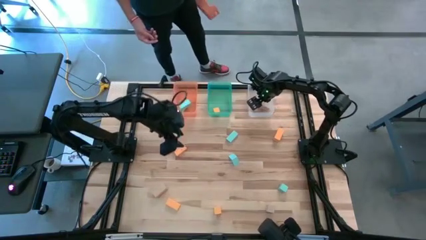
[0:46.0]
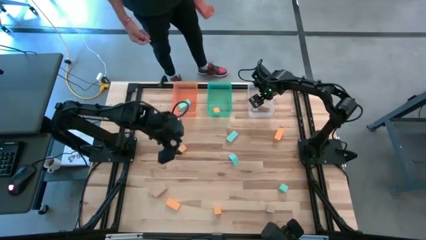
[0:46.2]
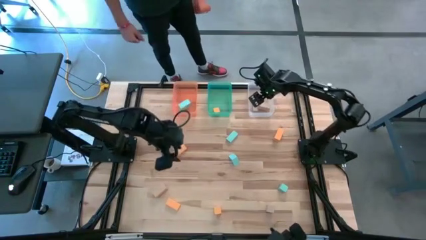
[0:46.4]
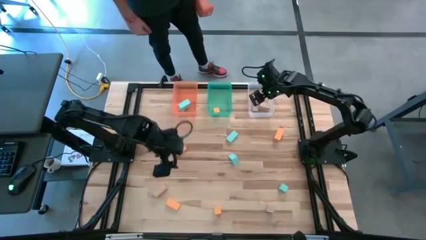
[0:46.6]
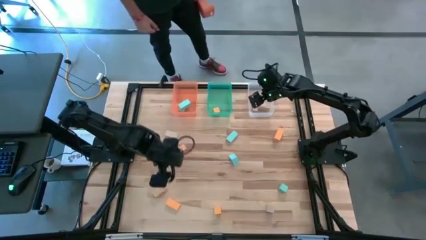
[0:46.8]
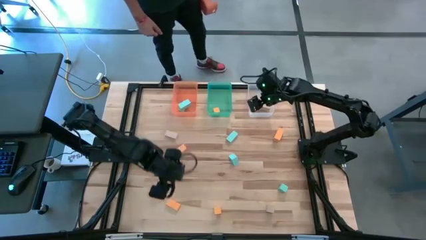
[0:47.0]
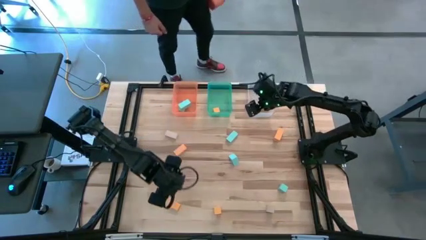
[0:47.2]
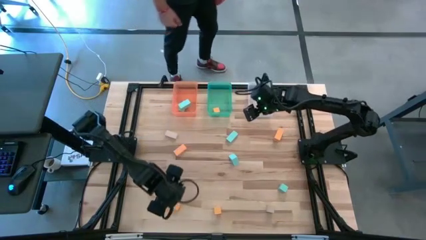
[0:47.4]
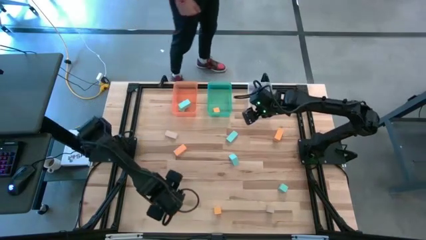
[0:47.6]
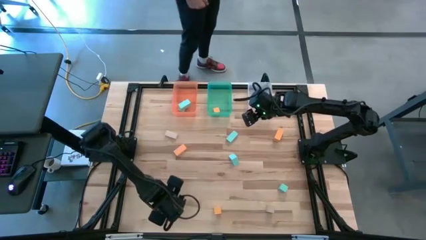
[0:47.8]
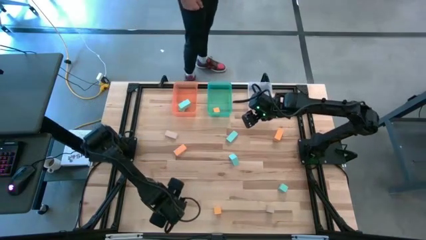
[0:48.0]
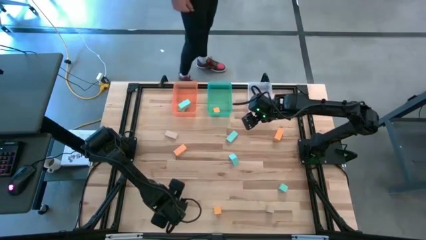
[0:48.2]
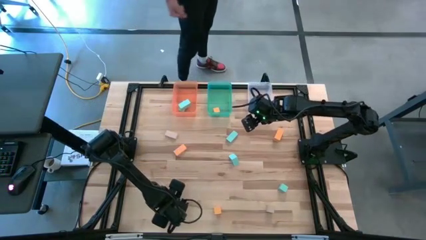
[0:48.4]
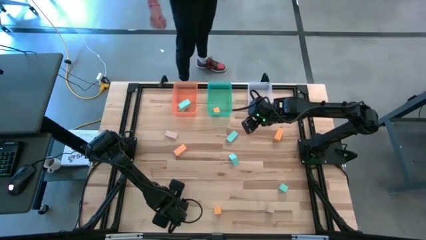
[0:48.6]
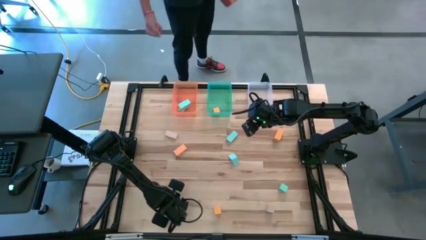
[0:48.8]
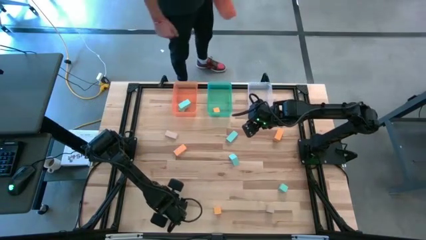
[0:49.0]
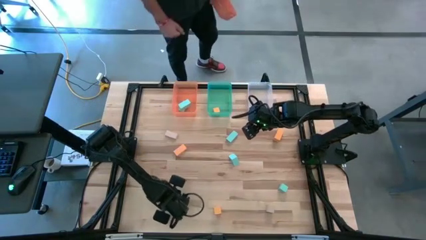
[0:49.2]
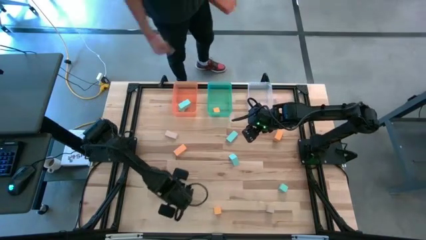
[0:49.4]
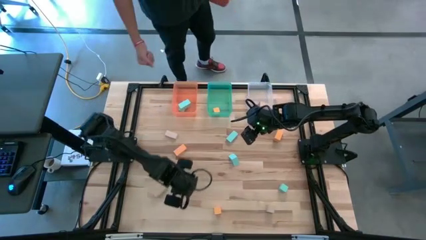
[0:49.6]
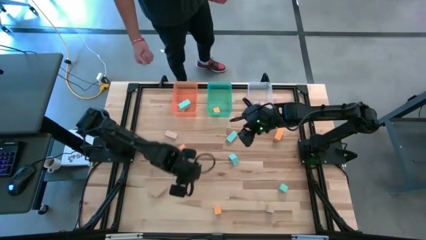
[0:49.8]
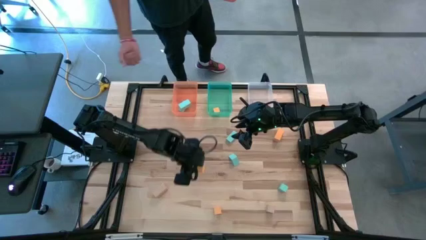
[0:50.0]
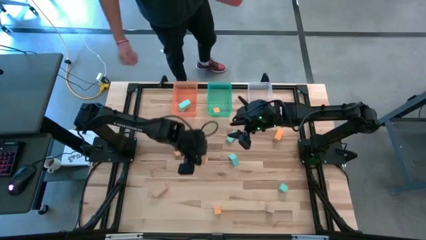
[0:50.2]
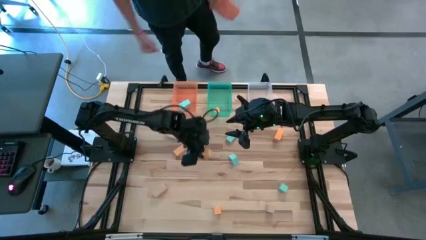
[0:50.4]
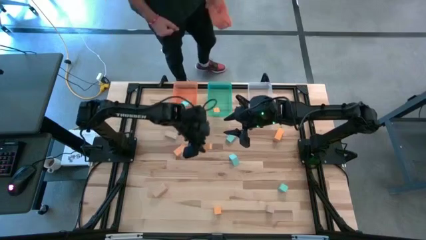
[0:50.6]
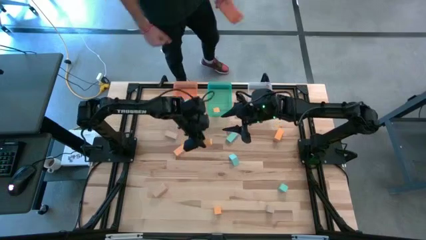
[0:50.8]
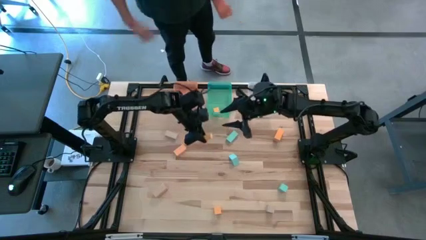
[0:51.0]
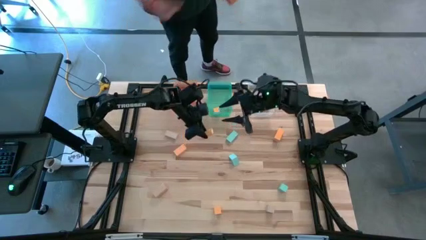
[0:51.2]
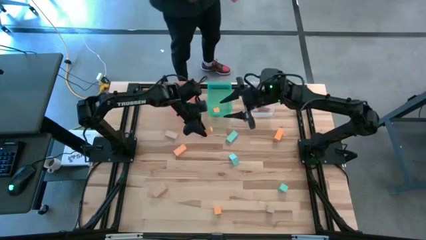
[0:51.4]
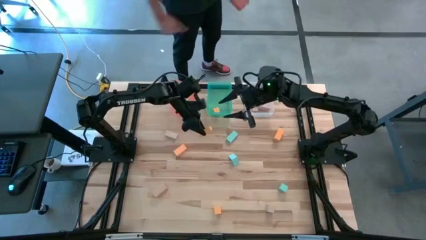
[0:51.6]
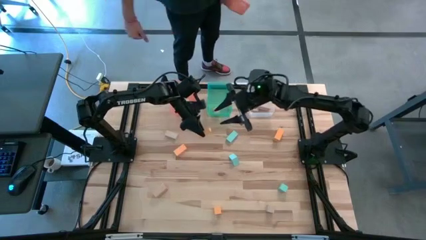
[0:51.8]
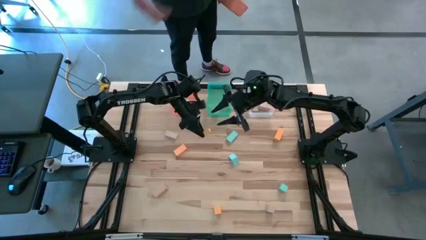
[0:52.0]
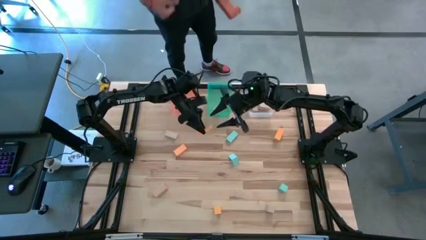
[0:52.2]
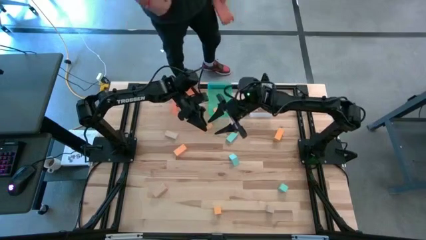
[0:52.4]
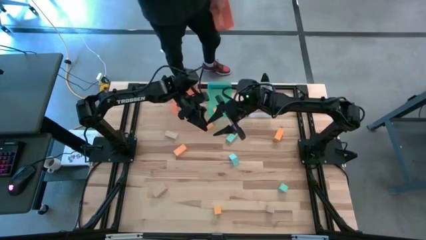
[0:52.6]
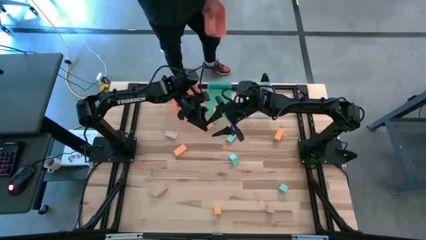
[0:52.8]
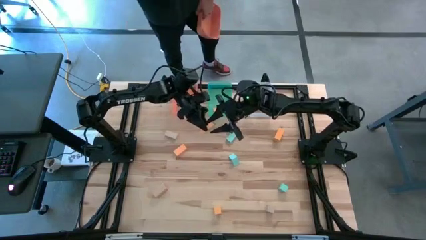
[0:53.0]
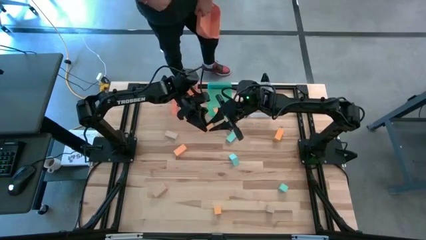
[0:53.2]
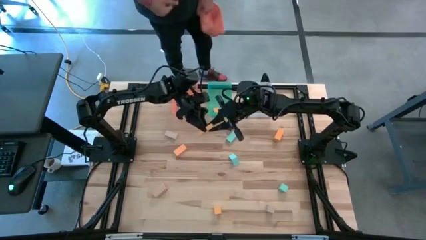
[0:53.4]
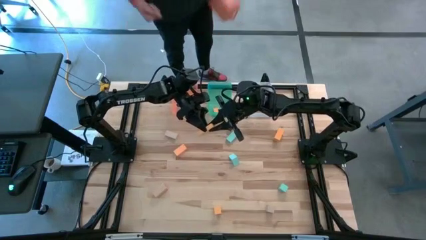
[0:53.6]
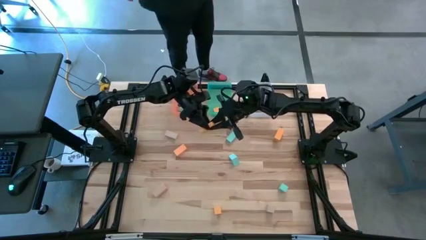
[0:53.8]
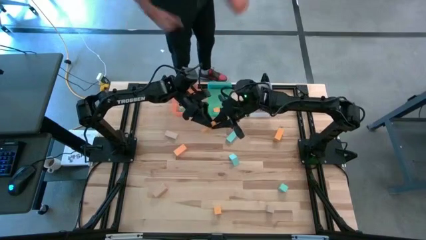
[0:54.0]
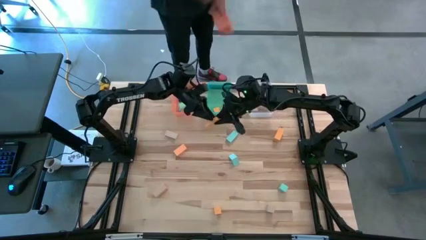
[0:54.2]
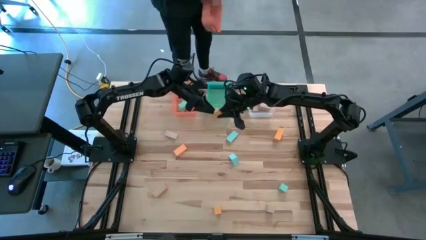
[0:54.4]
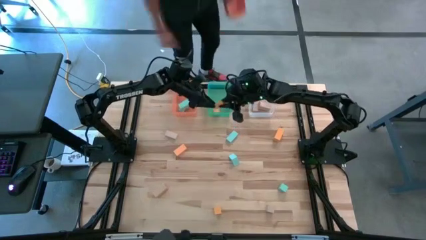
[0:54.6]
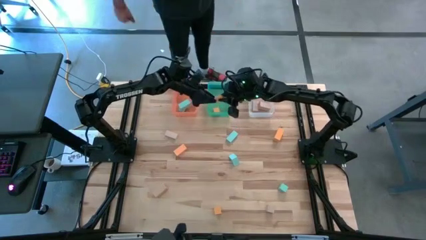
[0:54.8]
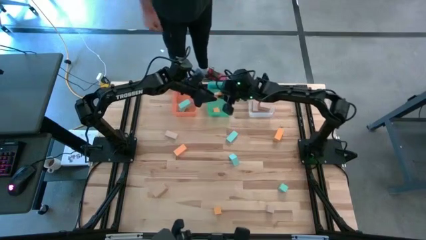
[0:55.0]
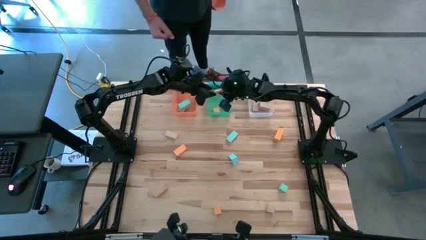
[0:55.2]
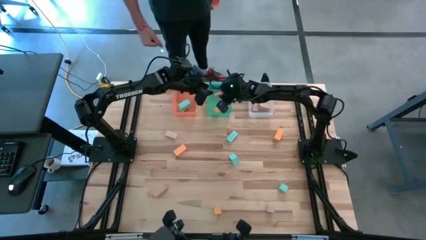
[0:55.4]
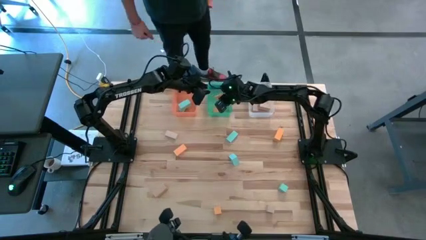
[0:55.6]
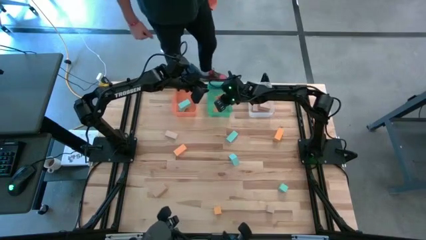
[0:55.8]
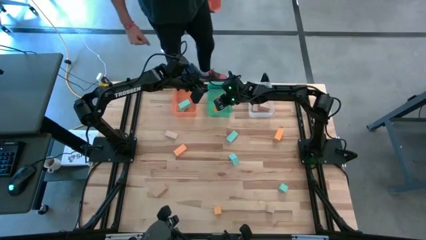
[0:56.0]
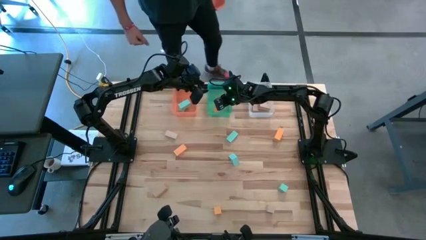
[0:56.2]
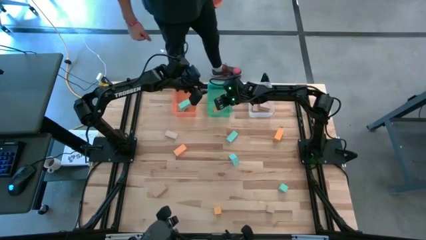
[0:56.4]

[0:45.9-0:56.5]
Task: Sort & place blocks by color
Put the yellow block into the green bin

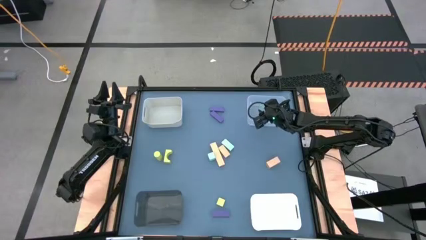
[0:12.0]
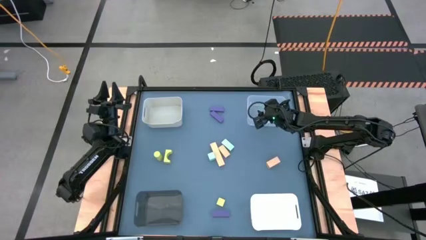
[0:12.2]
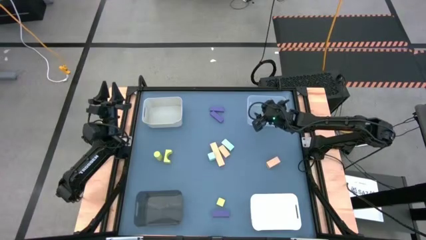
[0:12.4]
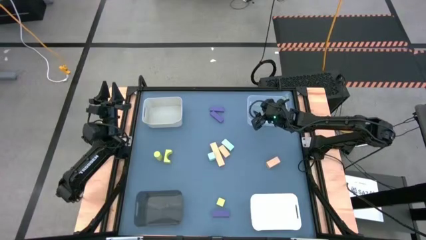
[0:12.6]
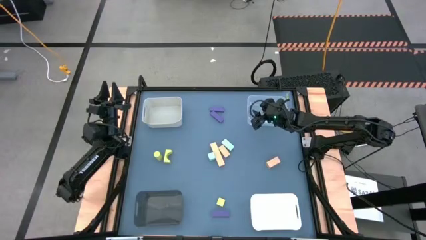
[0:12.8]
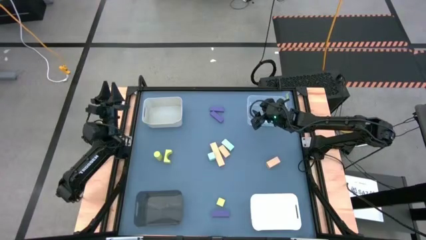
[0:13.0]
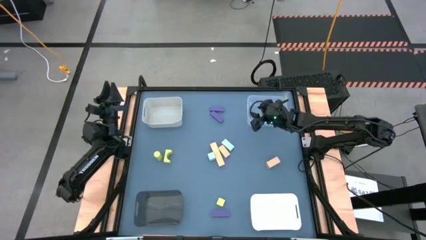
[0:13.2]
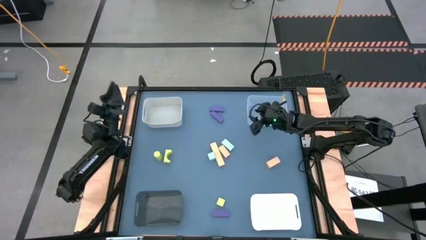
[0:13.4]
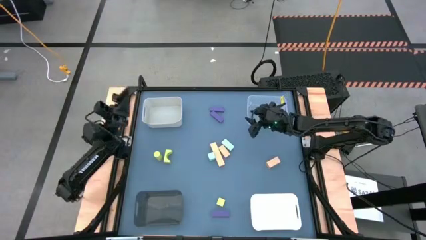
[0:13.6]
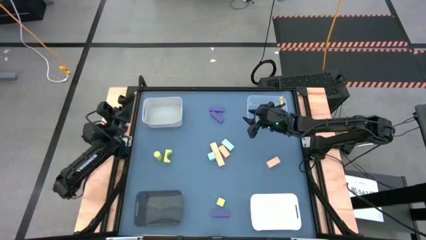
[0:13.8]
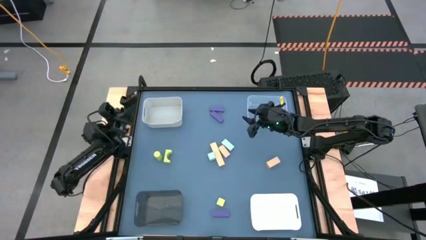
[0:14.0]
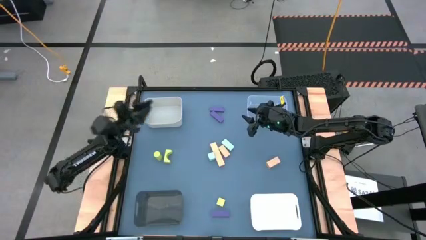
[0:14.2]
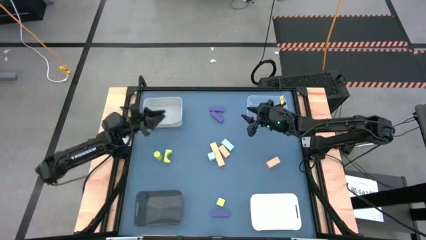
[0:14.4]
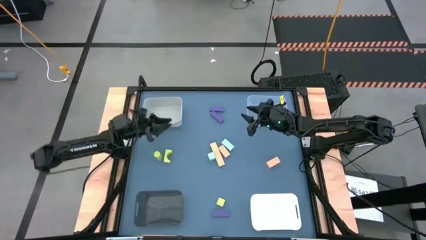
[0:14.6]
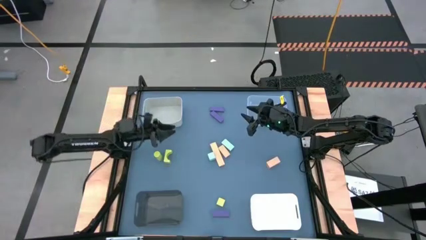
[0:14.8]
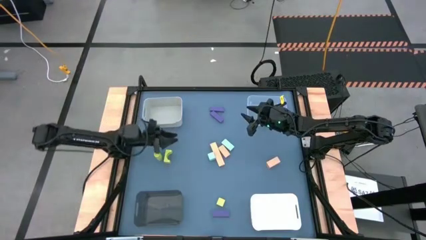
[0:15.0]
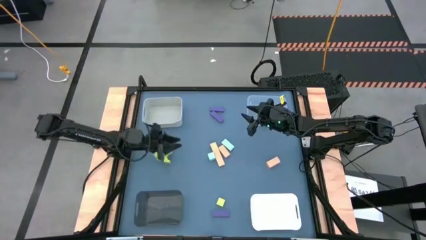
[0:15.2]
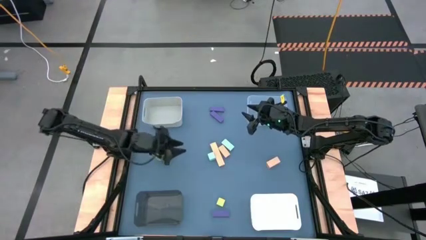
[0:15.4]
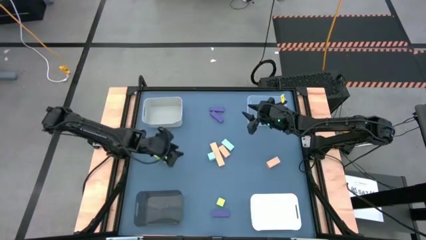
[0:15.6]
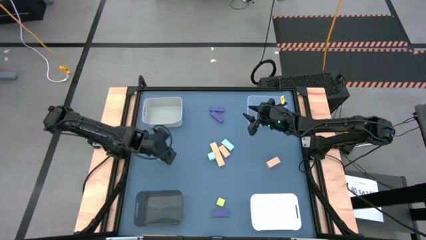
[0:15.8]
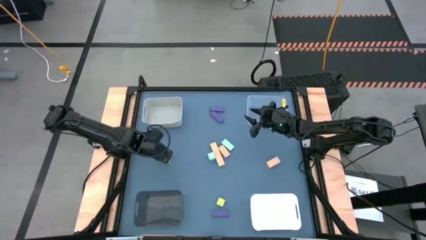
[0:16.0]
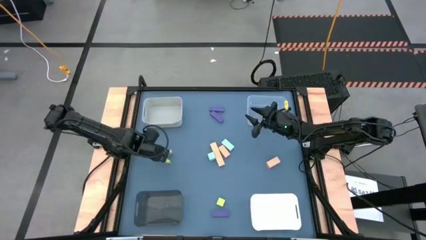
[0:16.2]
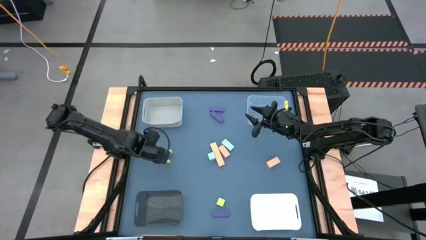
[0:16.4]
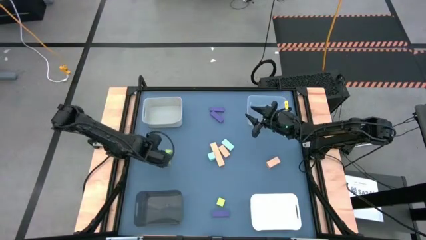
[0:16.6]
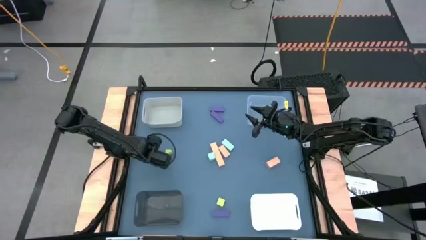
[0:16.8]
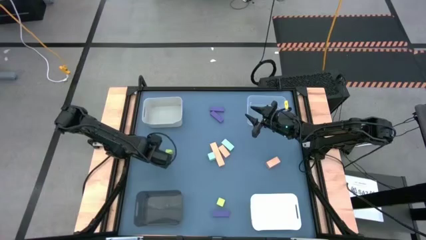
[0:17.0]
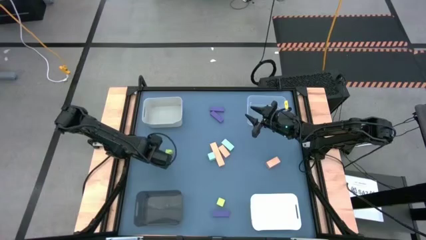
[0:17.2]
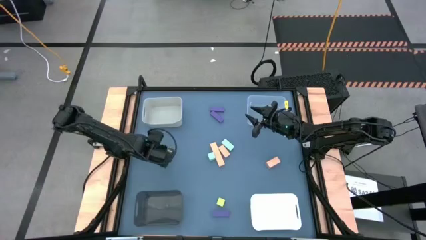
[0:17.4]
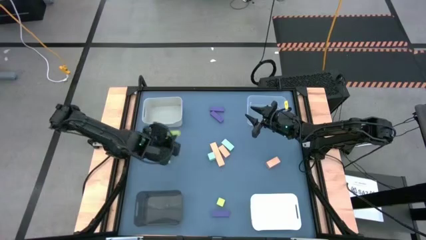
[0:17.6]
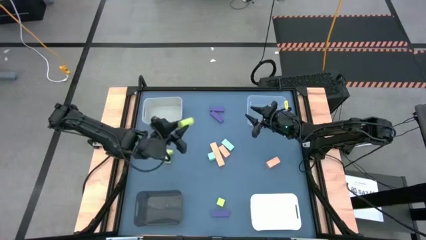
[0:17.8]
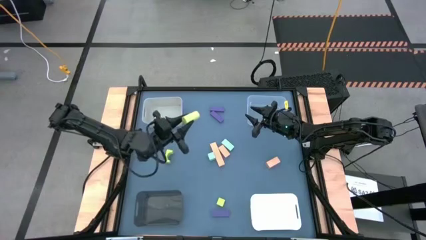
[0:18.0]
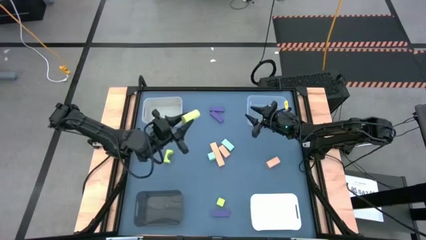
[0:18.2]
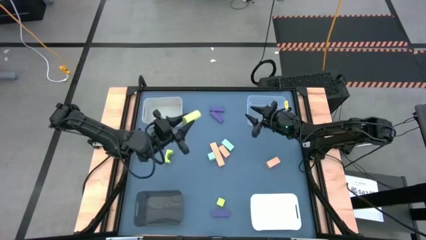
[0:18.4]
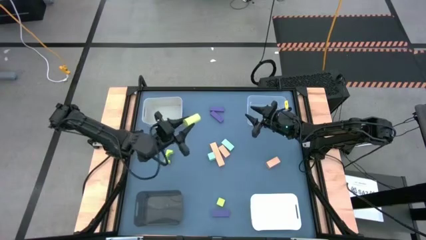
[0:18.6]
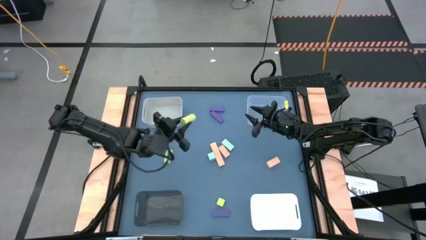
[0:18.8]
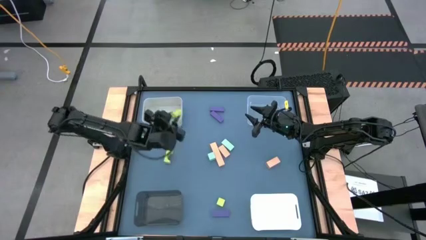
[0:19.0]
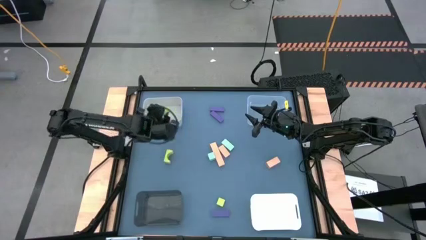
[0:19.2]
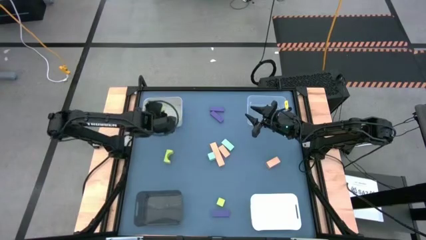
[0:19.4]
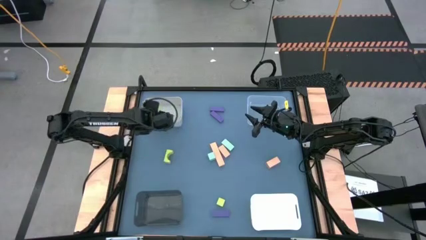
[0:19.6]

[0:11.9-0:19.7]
Task: Sort & place blocks by color
Put the green block into the gray bin
